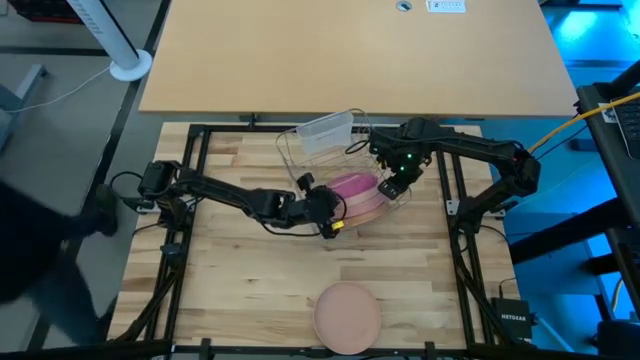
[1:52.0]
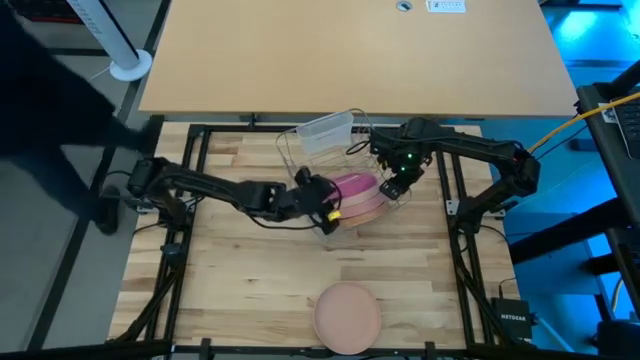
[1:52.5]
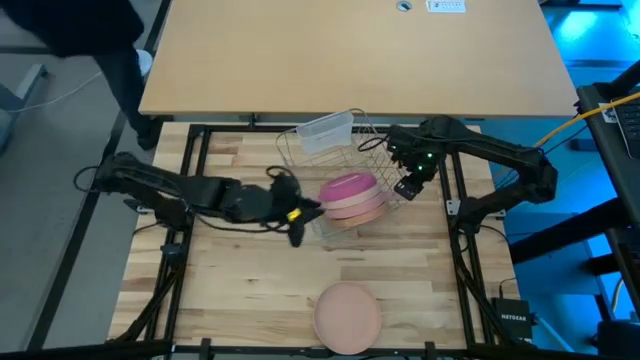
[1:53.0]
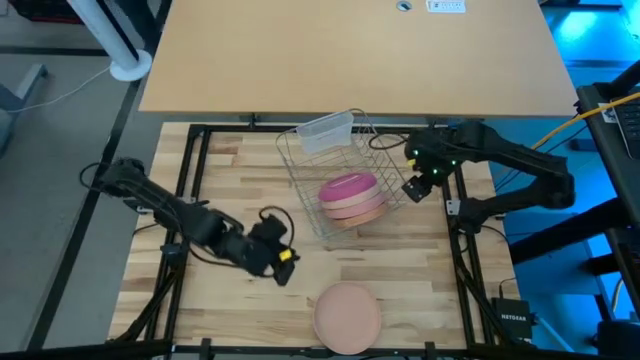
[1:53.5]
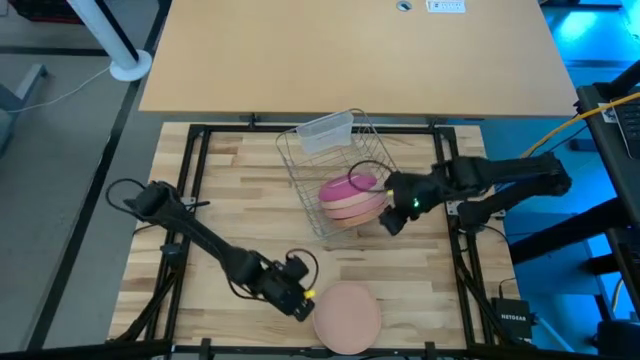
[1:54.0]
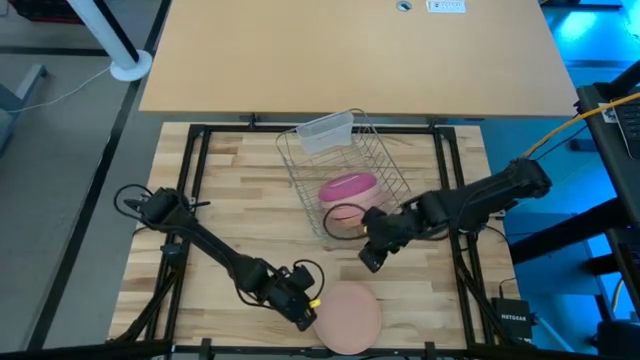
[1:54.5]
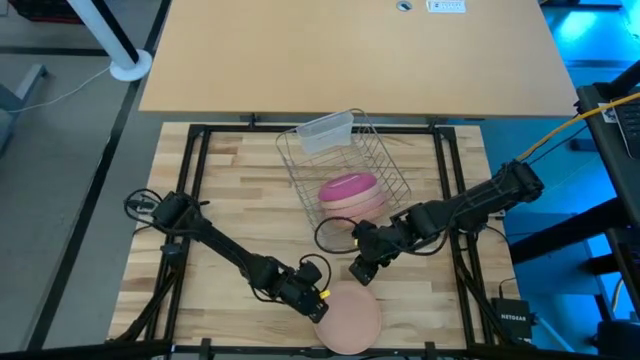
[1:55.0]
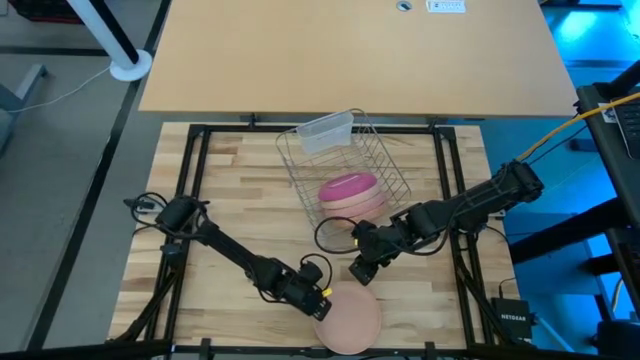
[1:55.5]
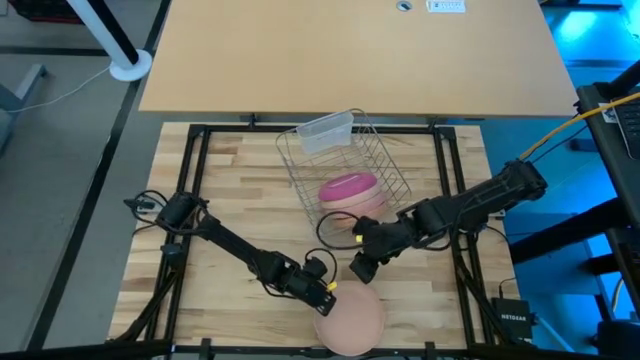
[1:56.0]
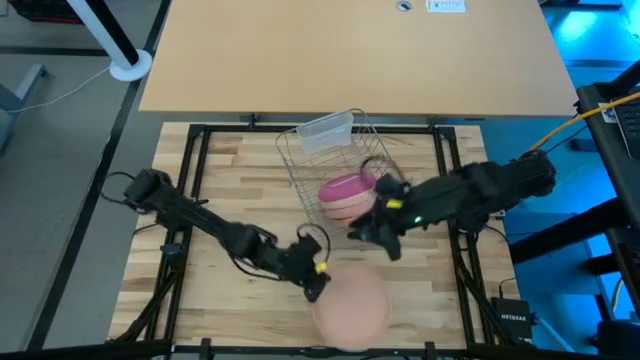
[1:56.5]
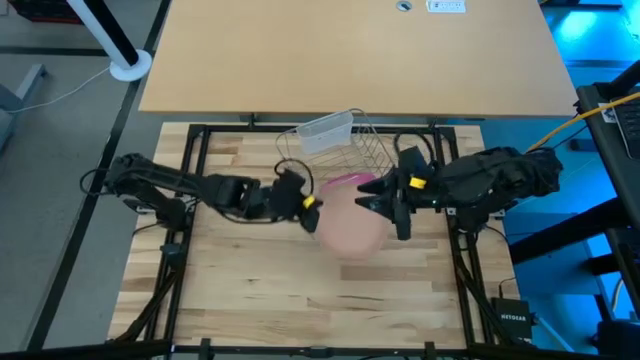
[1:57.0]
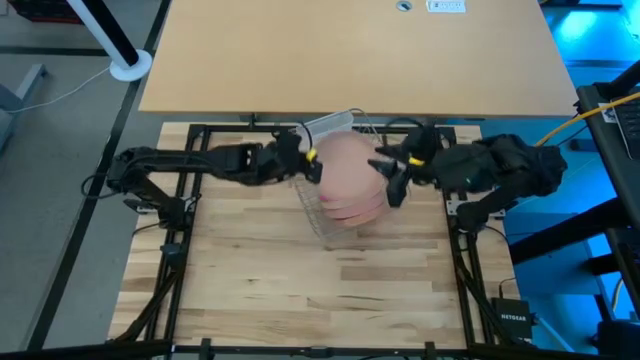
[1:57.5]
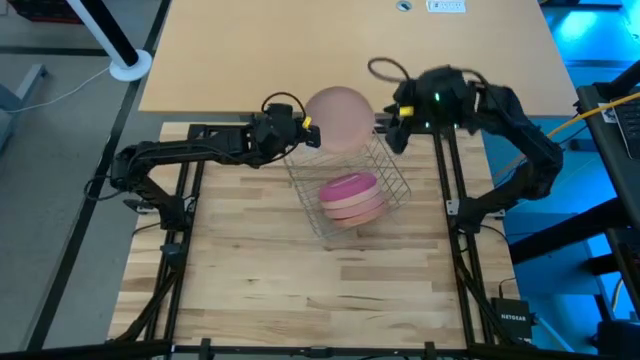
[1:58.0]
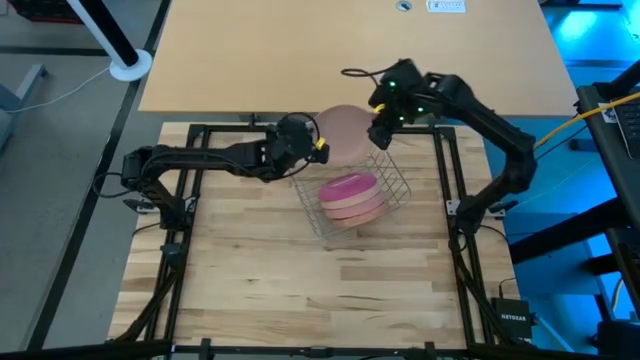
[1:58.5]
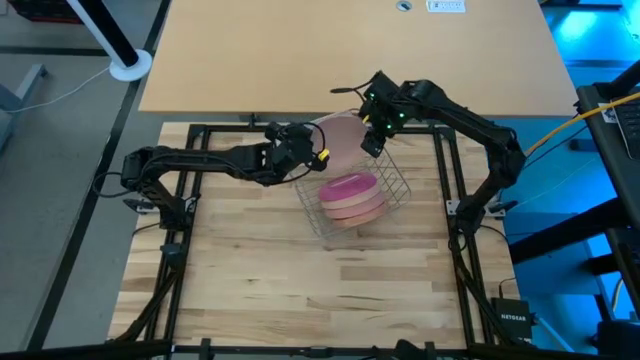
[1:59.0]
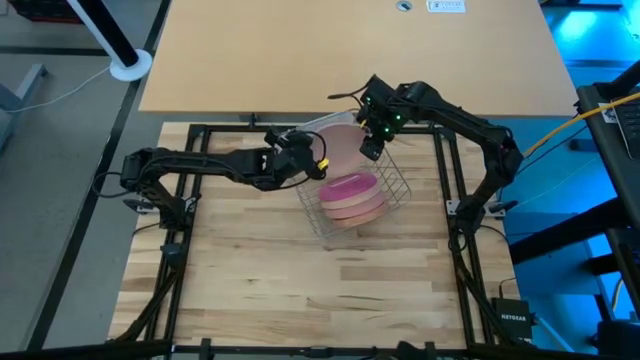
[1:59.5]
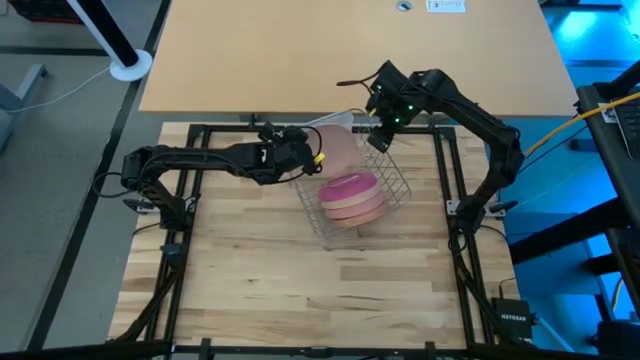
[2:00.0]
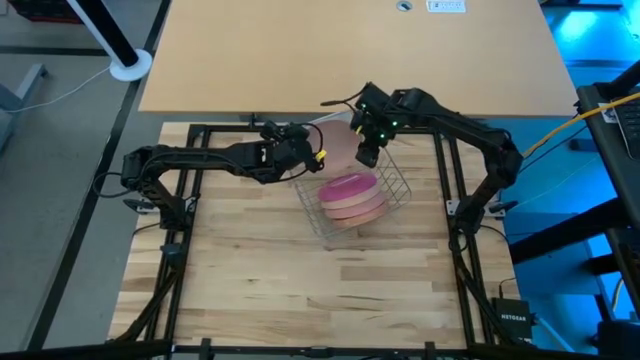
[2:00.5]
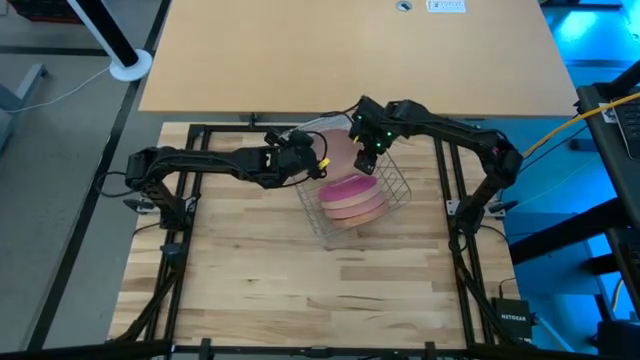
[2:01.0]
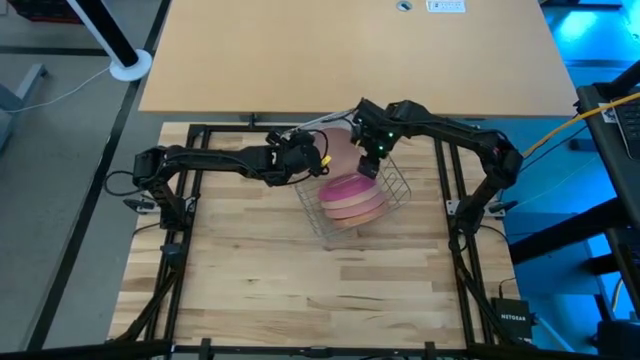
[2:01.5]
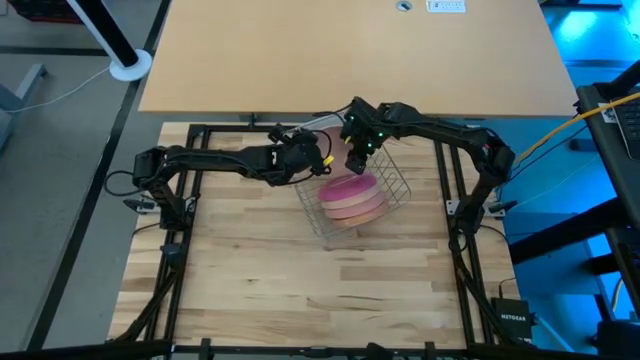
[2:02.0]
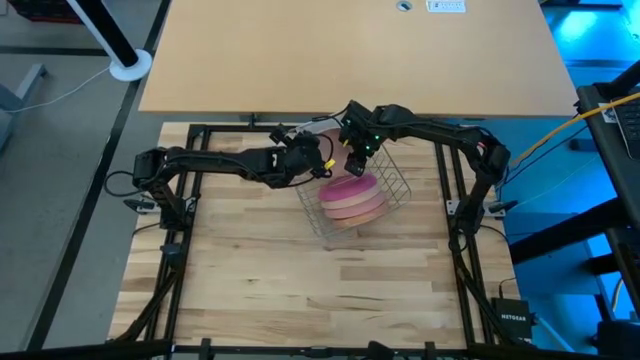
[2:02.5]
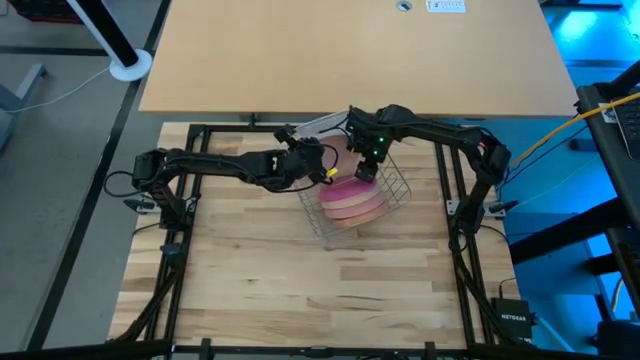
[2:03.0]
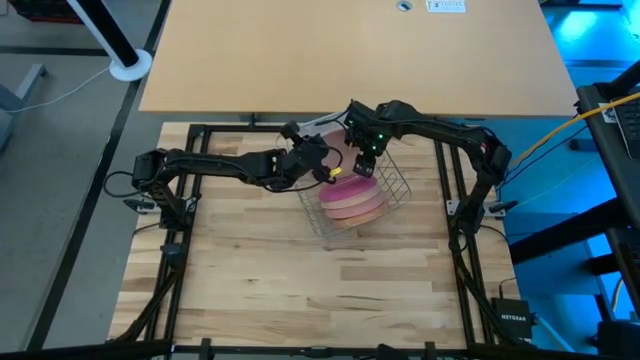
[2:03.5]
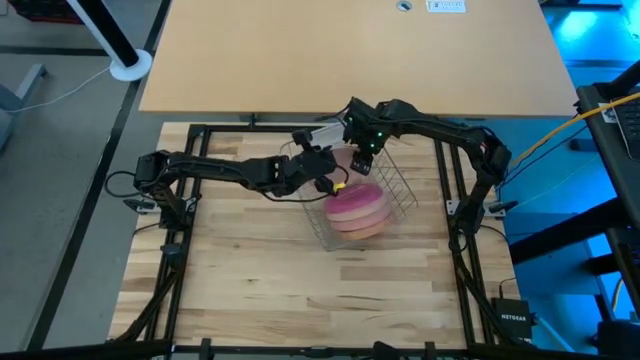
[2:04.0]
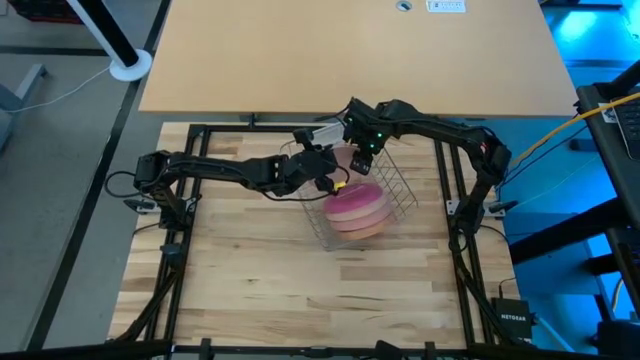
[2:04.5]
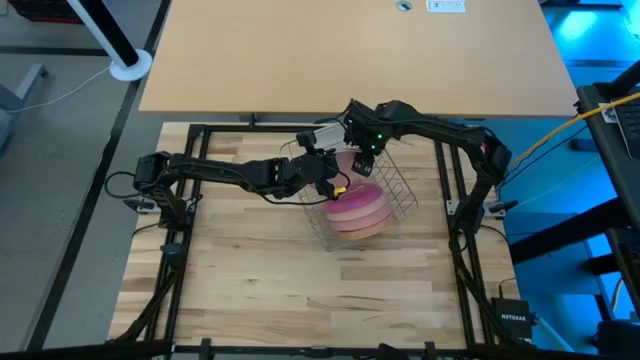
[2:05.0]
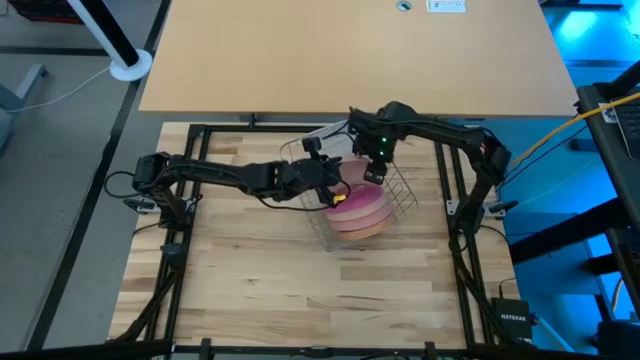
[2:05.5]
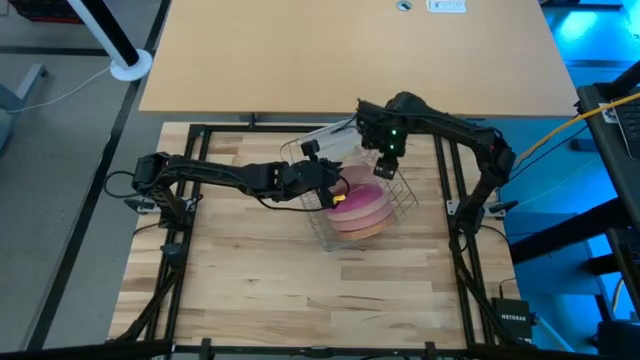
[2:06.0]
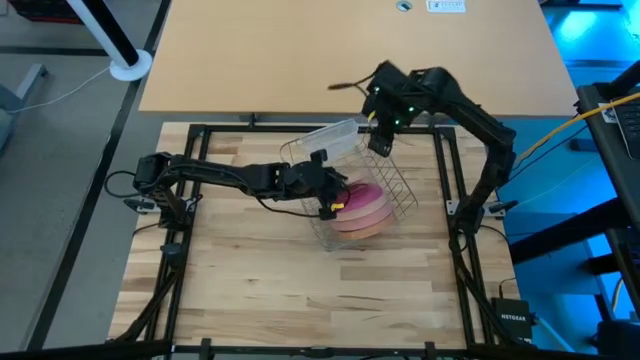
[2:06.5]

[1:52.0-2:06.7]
Task: Sort dishes
Put the light orange plate in the dish rack

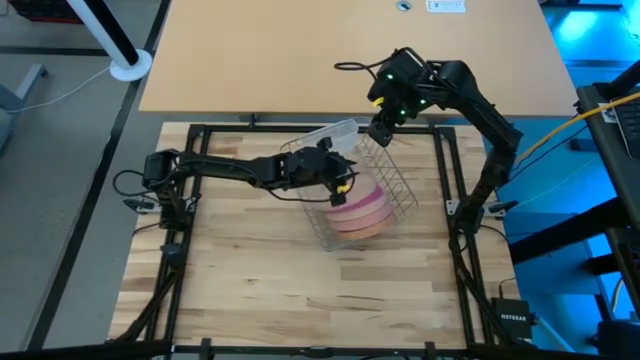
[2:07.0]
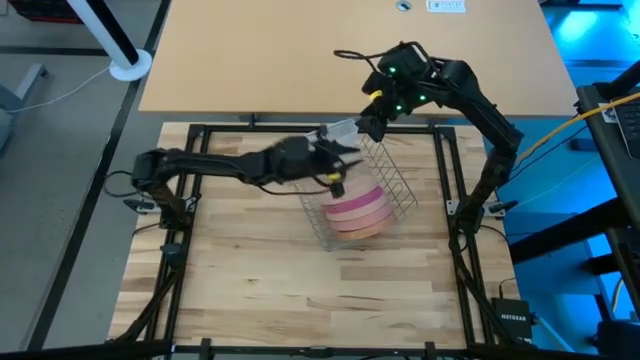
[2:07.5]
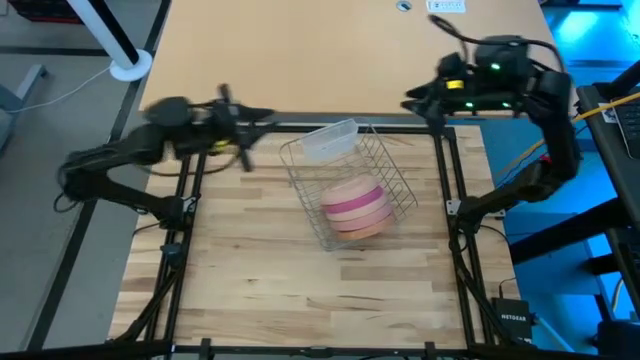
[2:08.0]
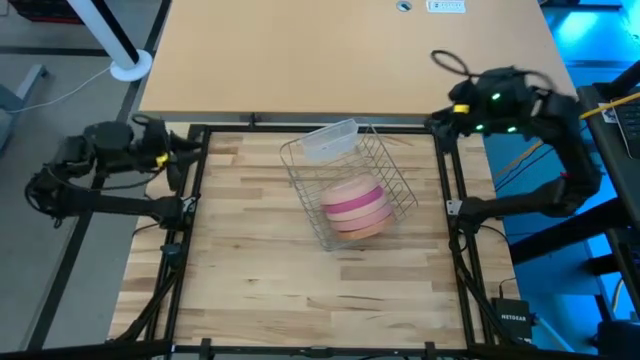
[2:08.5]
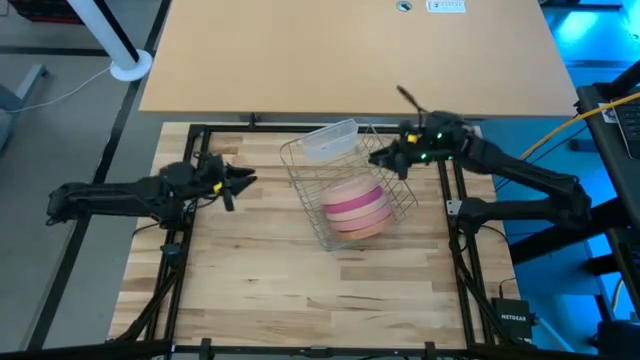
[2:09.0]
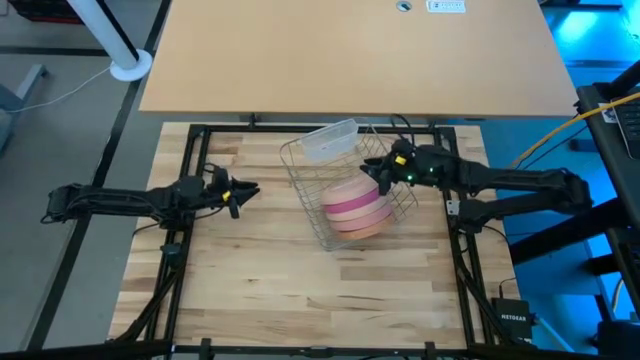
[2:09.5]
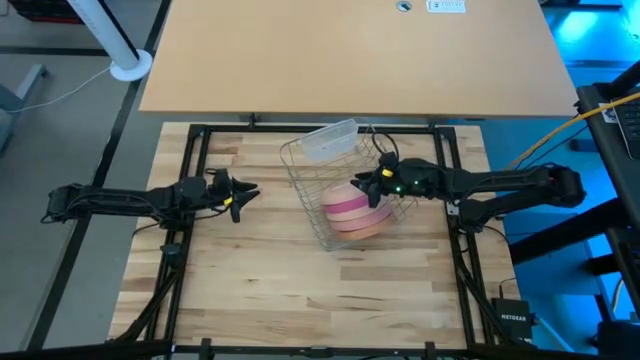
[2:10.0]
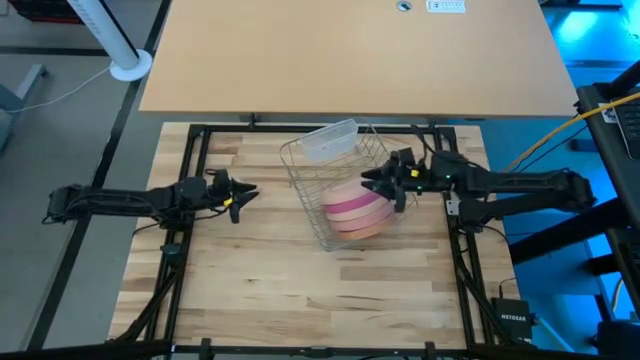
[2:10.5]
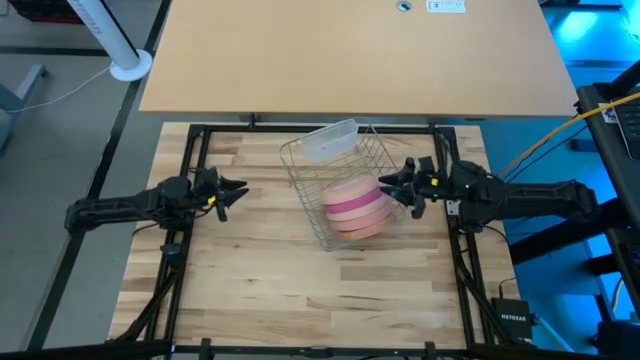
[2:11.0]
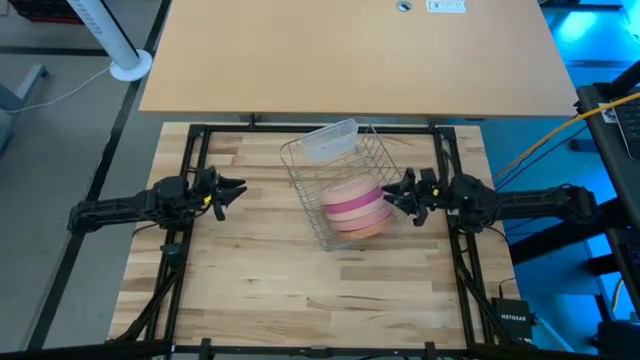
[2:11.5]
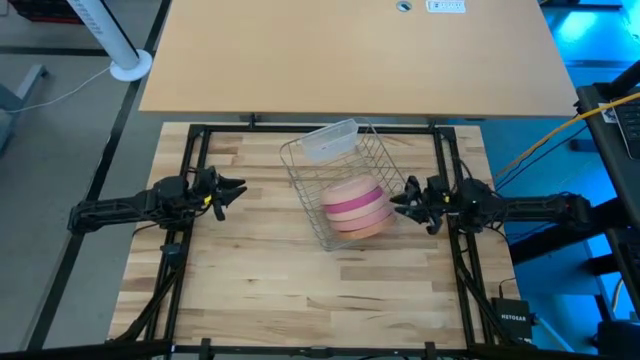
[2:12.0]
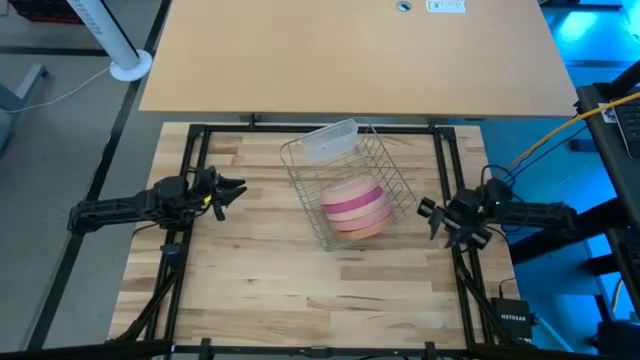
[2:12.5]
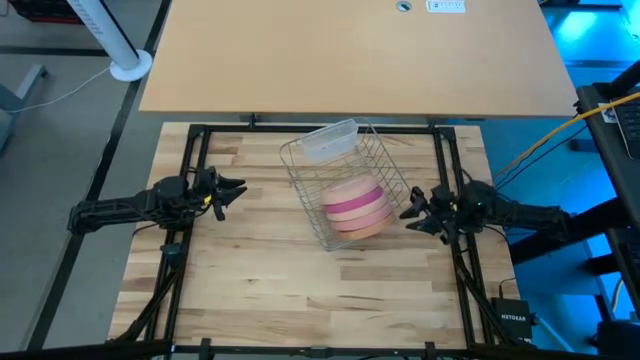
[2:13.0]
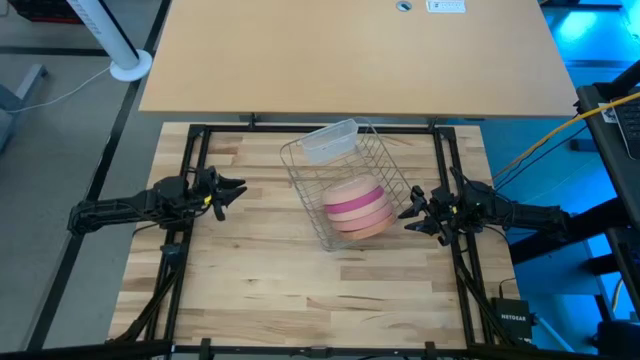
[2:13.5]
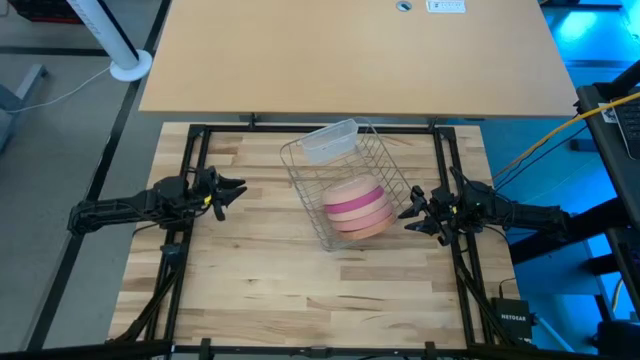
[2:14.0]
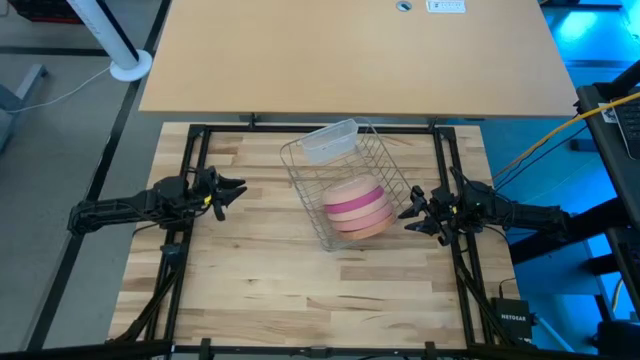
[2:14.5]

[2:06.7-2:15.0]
Return to Home Position
